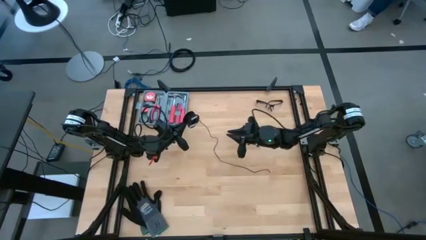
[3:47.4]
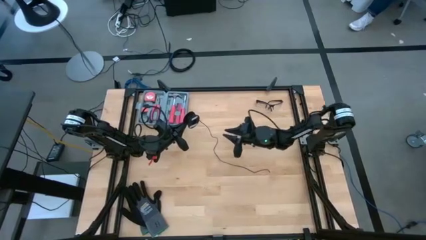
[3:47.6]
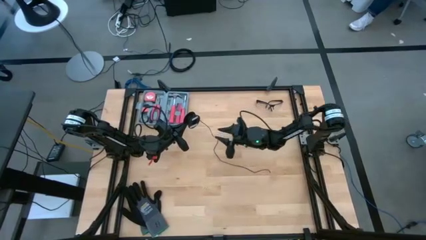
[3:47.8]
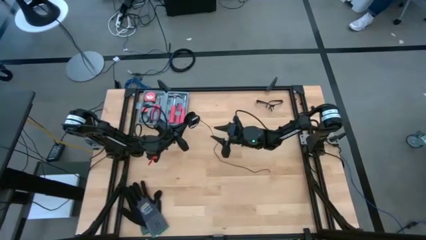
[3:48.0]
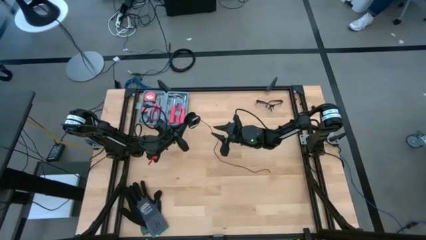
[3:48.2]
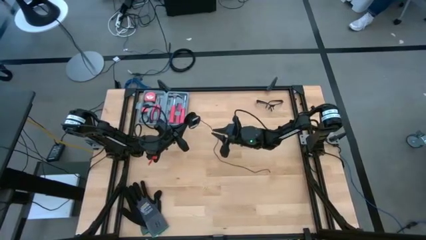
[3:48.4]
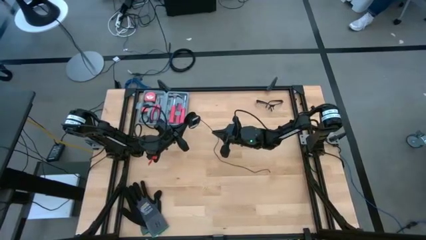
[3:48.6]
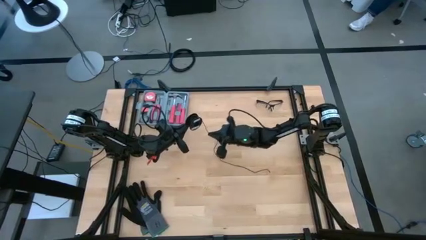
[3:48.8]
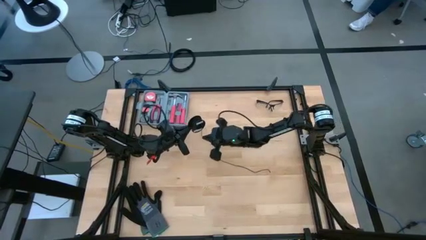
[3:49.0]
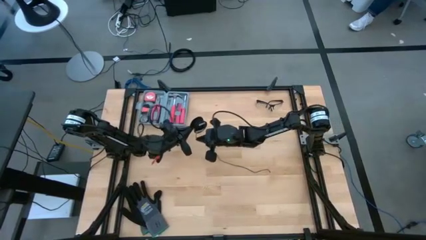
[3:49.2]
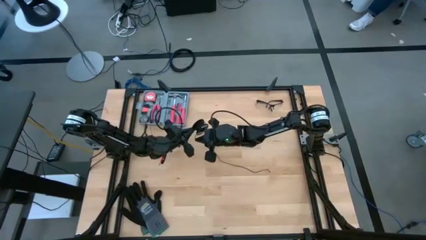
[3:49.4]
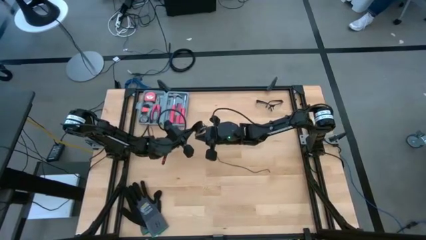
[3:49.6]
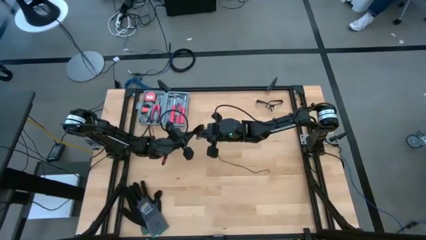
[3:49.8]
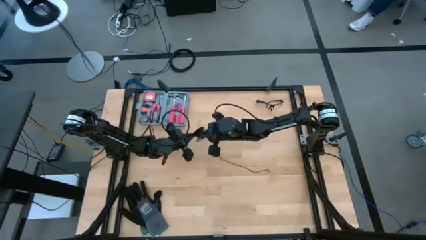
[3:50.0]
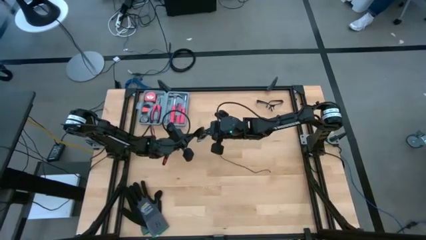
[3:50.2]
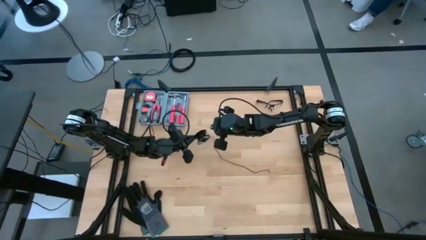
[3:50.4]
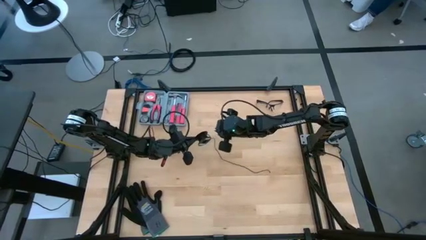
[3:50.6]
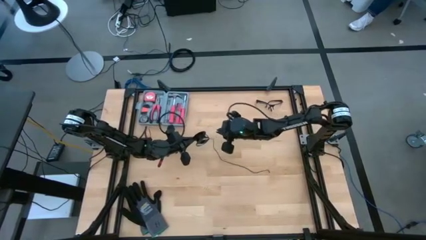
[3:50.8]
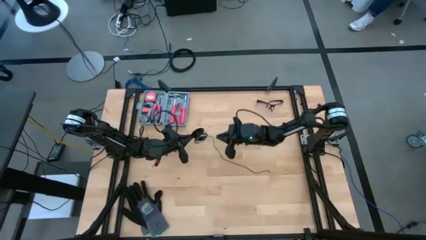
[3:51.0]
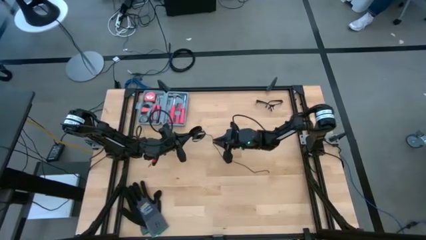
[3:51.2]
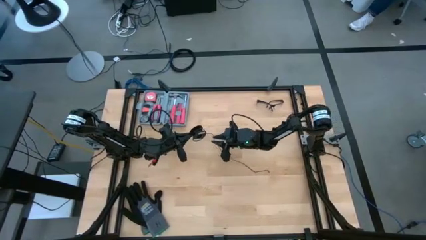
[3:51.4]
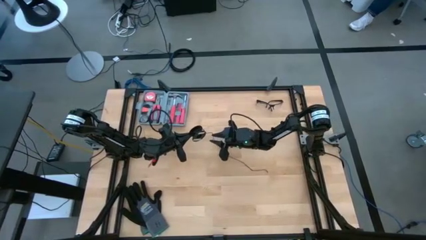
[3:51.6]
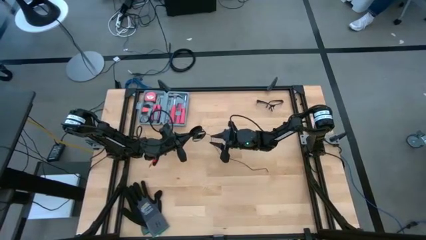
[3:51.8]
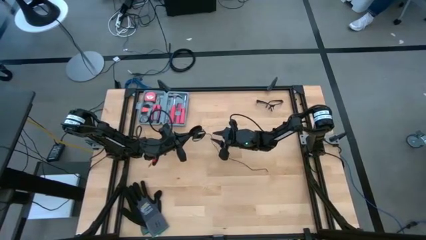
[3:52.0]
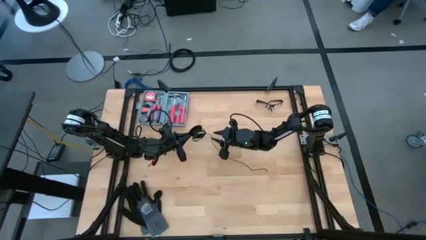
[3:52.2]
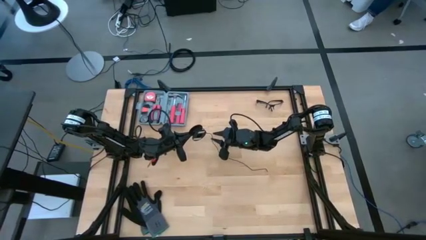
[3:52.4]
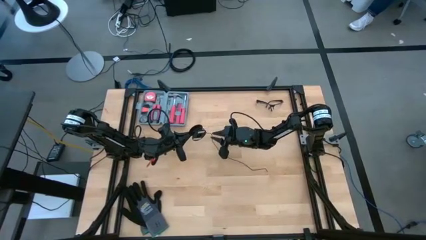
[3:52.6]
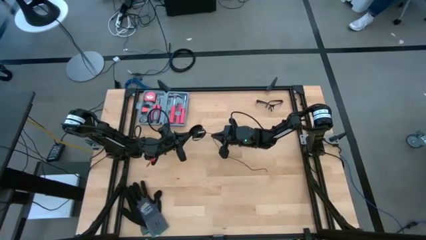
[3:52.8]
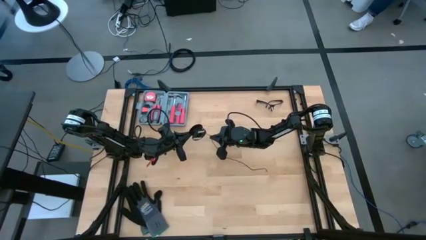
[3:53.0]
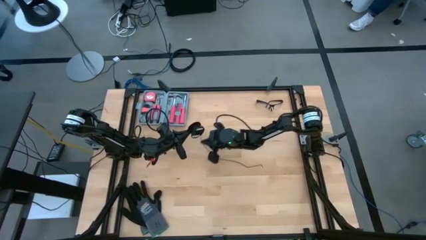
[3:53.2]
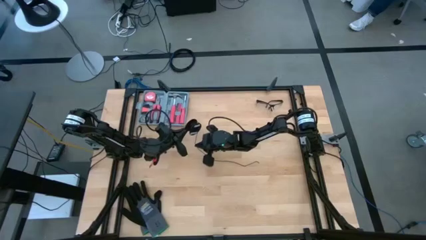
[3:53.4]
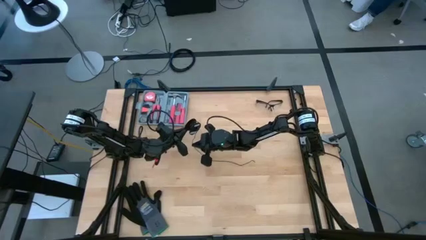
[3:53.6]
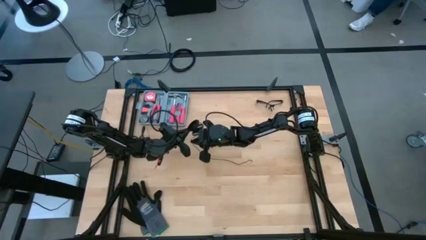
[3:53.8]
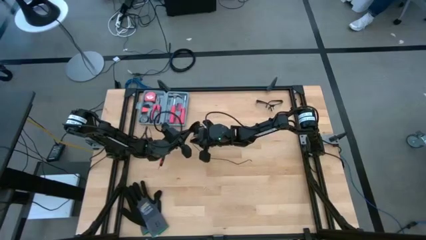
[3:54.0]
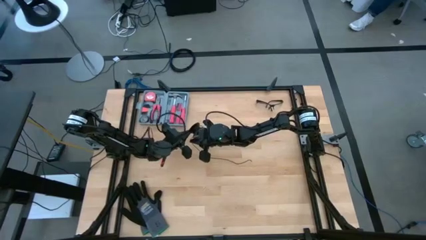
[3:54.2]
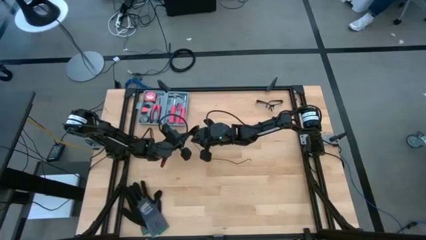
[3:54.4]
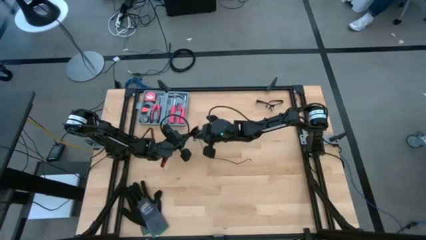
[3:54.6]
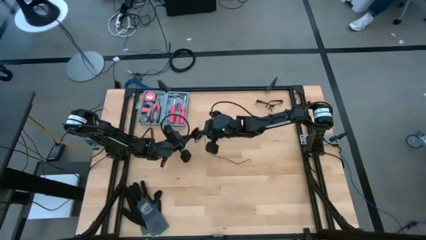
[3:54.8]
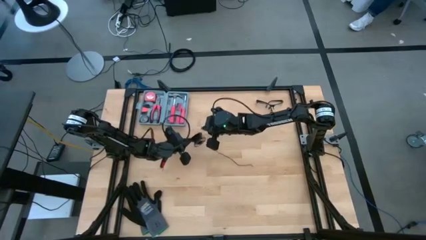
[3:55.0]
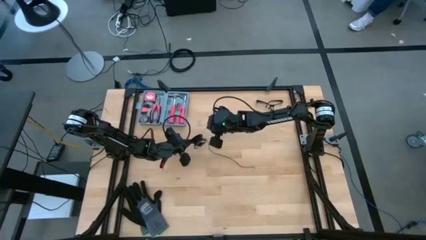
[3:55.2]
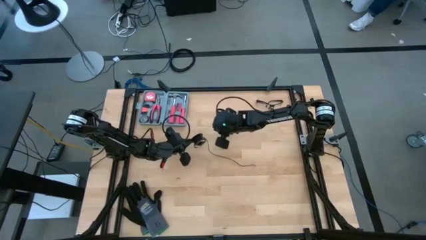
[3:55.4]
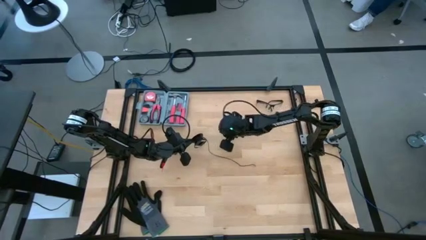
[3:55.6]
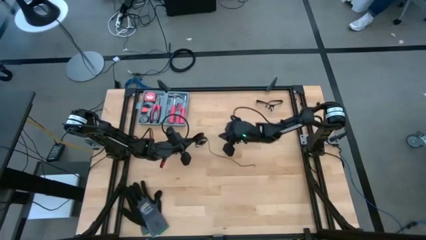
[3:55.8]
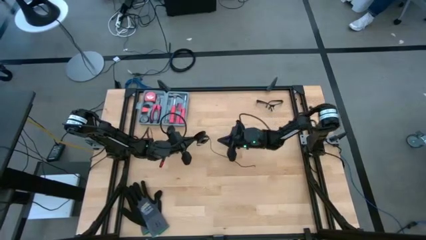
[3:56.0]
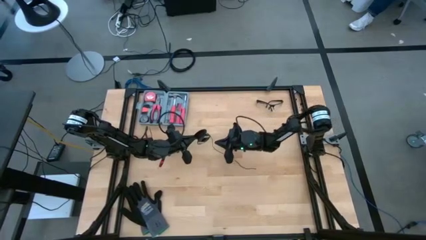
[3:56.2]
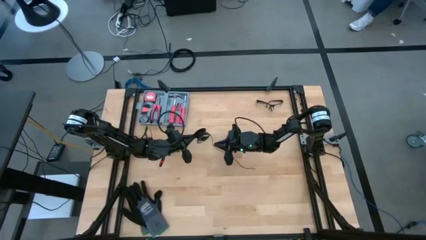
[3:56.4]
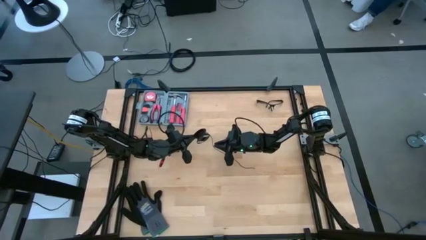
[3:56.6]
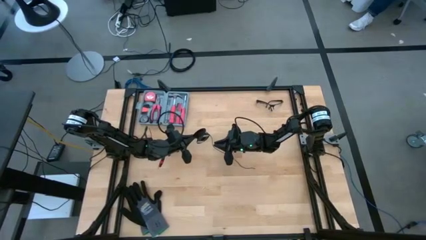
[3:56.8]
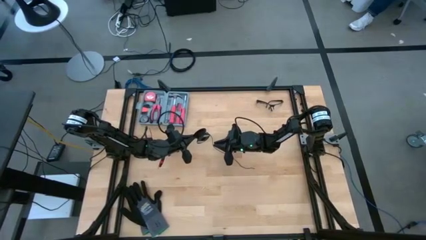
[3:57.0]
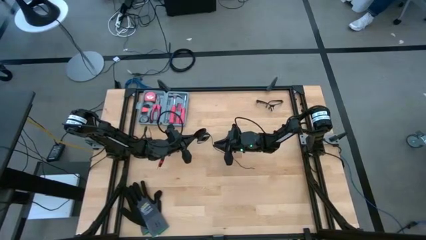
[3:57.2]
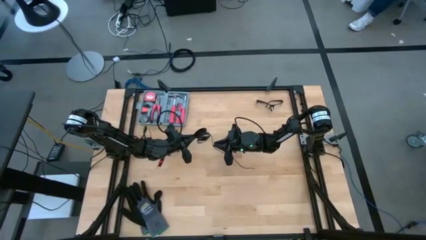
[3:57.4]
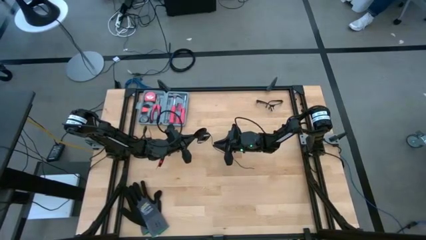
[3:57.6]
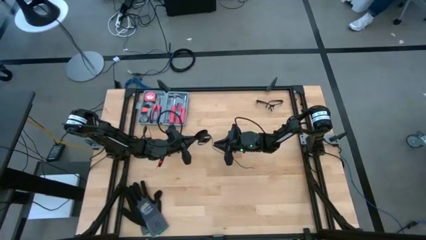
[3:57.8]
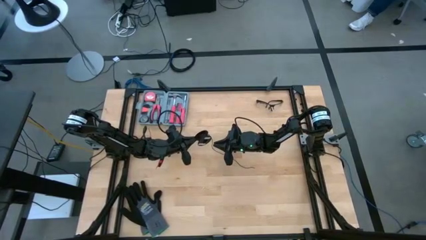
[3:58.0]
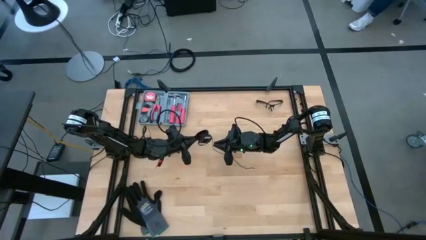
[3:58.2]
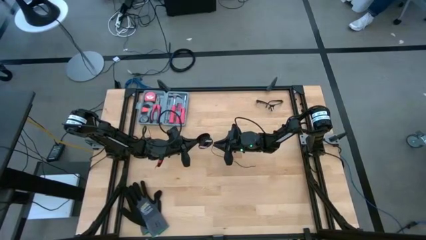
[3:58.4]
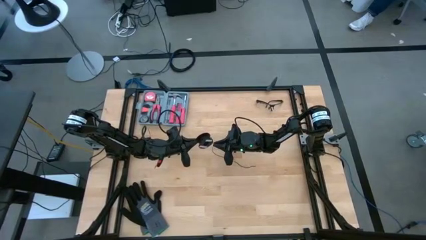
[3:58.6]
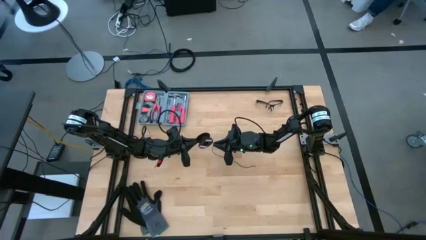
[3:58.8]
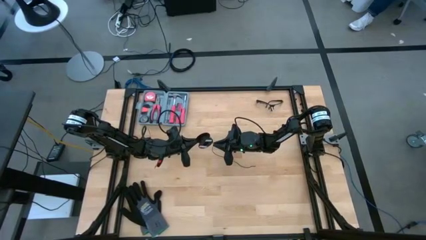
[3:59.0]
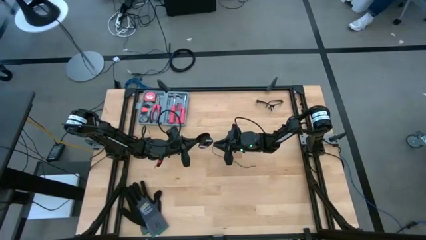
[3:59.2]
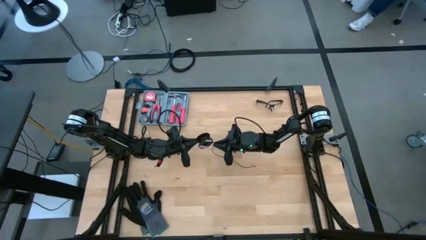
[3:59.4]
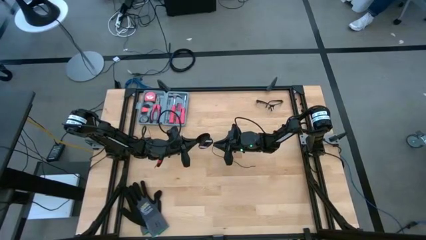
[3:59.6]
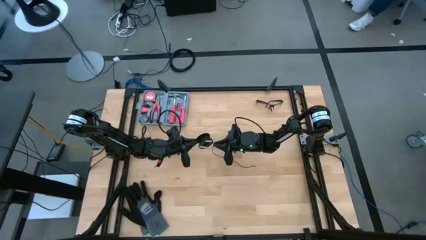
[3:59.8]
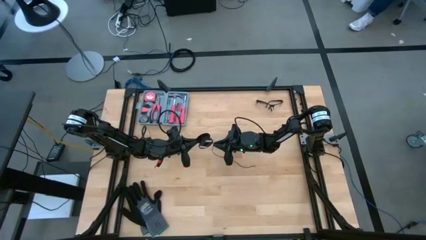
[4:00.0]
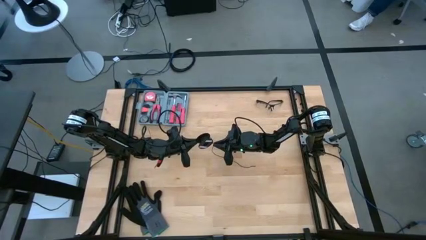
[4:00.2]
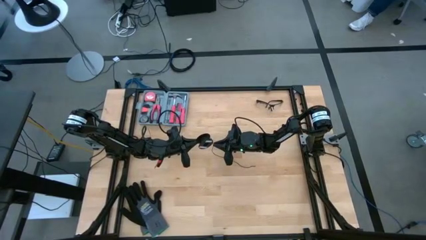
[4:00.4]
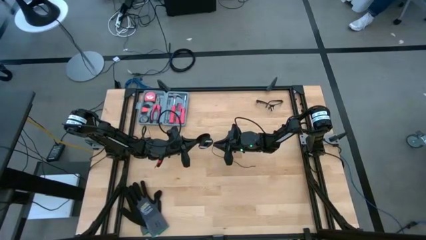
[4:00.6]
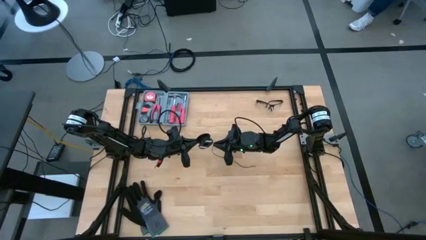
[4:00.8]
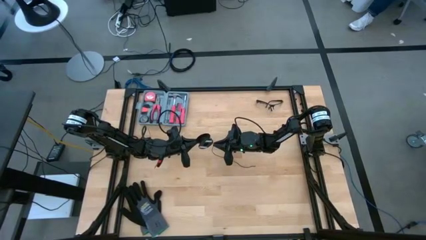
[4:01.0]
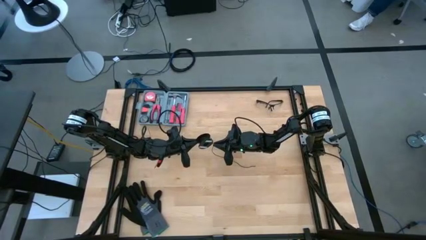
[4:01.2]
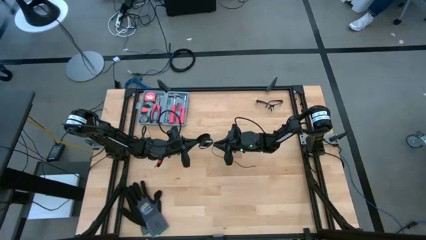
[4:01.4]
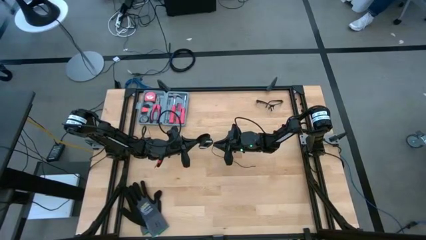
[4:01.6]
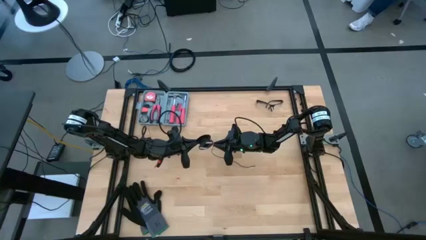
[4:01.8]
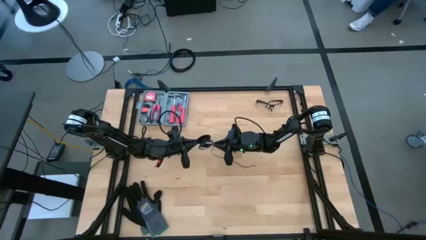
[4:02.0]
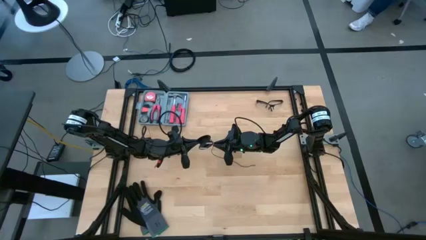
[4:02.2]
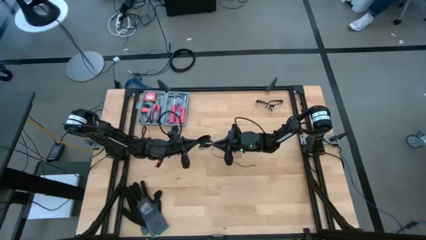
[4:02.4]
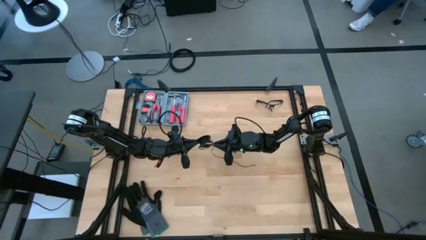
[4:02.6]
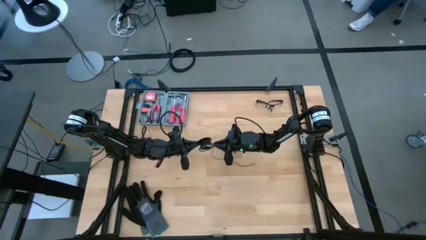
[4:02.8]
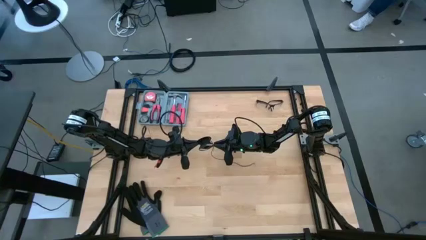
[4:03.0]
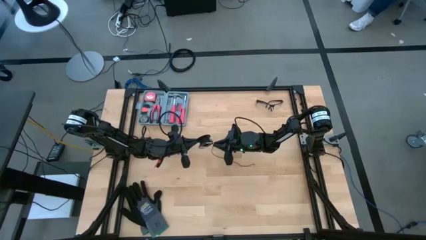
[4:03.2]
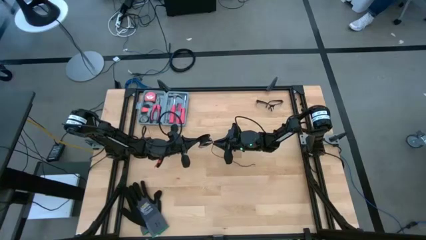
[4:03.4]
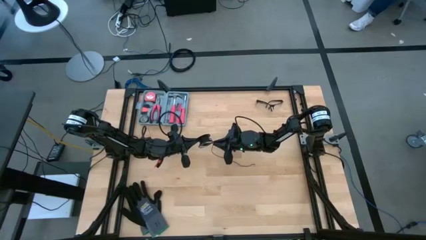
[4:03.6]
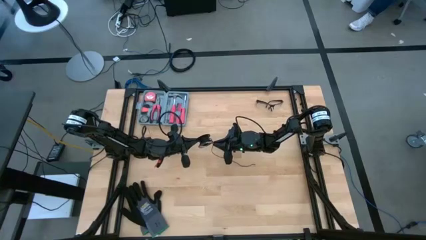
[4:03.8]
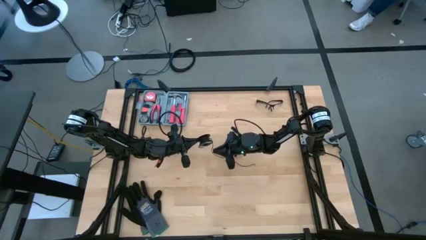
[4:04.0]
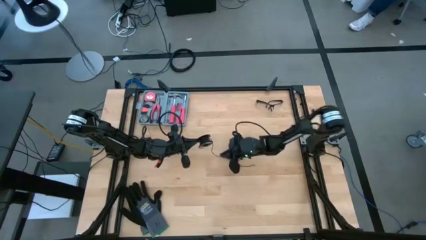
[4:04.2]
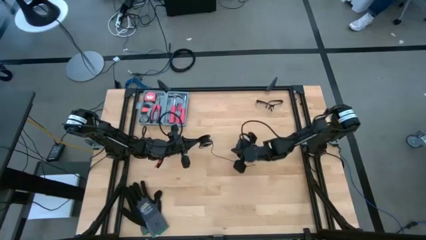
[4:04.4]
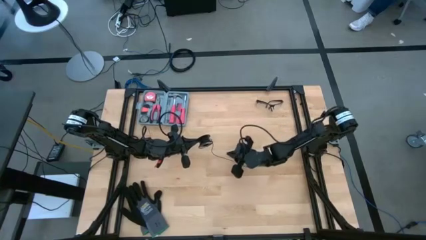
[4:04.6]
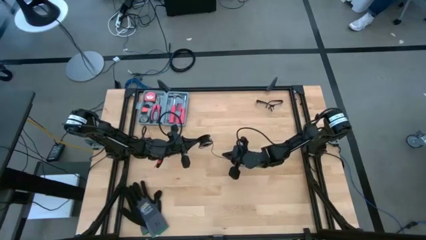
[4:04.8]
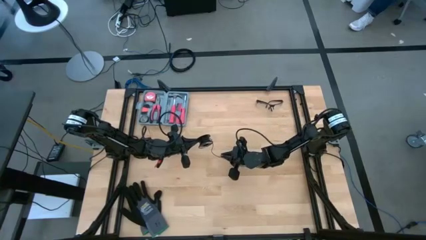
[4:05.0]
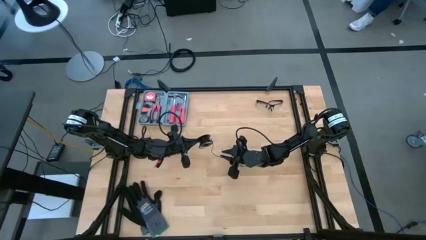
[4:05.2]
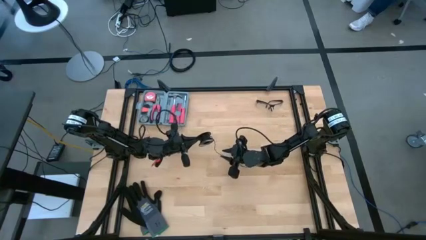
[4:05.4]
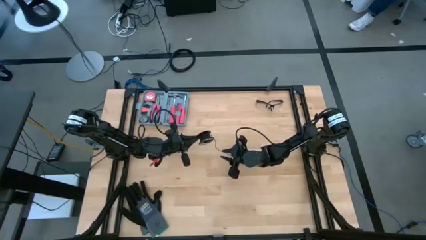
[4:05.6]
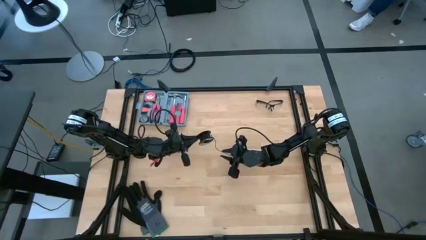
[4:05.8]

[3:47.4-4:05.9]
Task: Coil cords
Coil the black wire on the black spool
